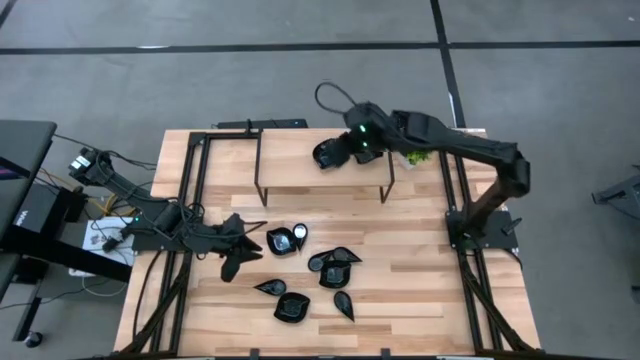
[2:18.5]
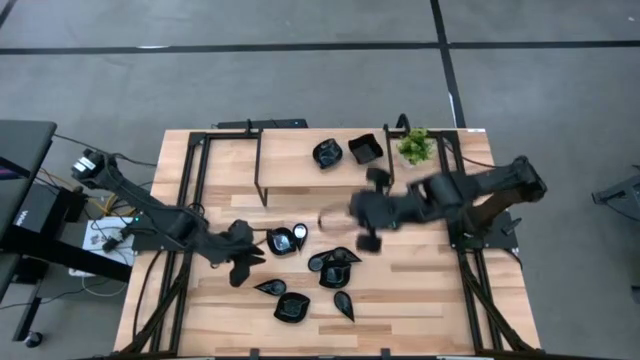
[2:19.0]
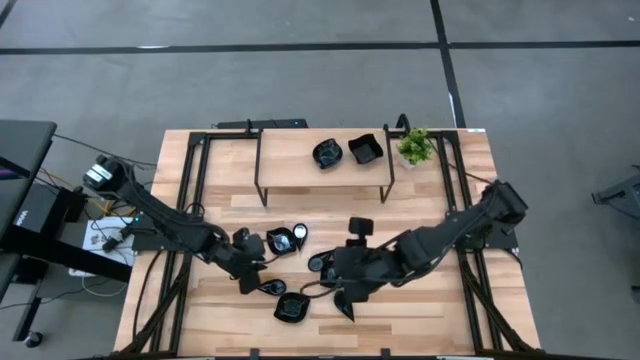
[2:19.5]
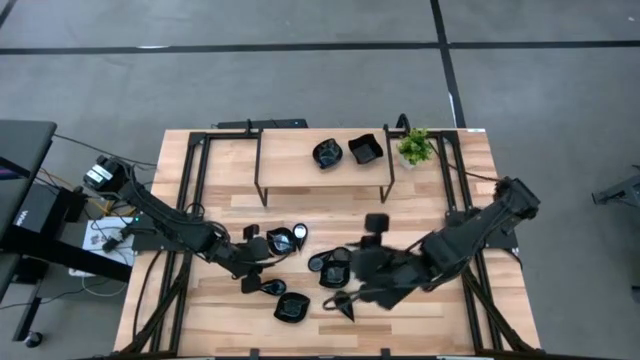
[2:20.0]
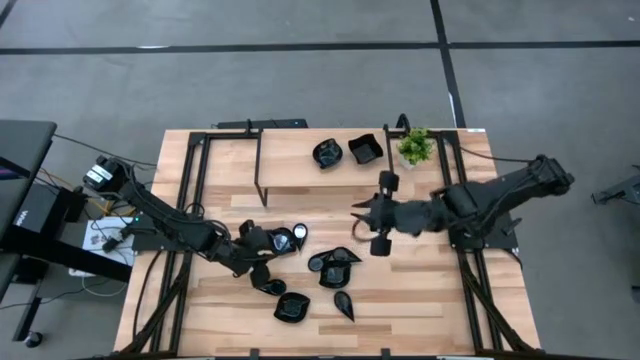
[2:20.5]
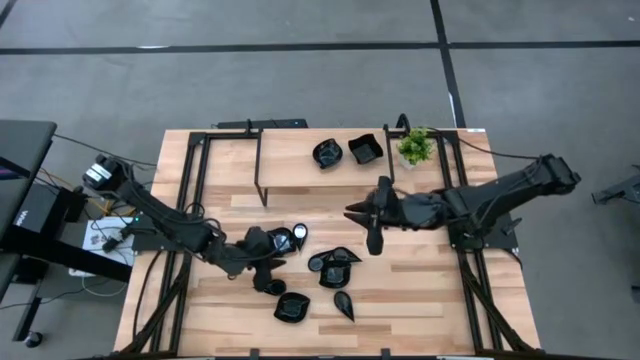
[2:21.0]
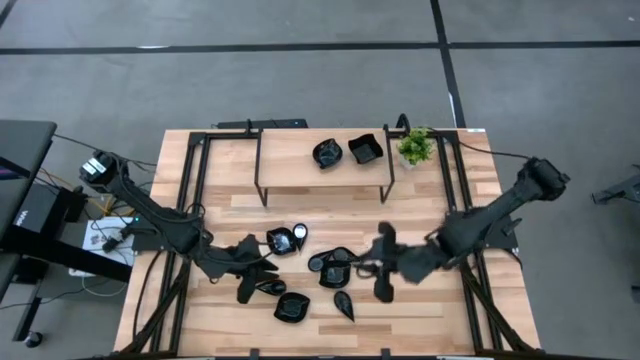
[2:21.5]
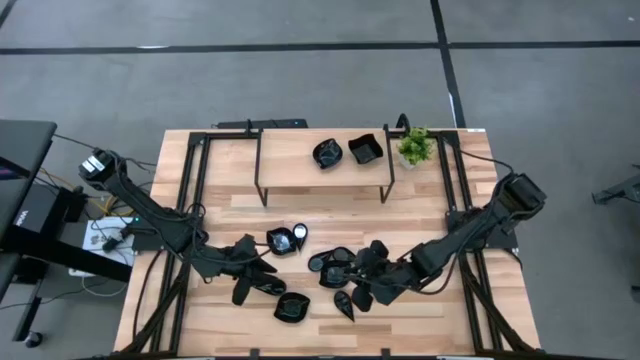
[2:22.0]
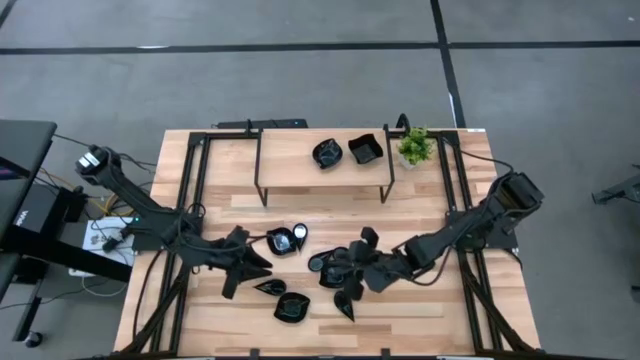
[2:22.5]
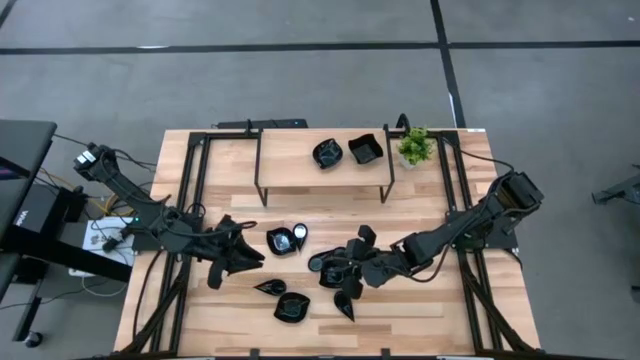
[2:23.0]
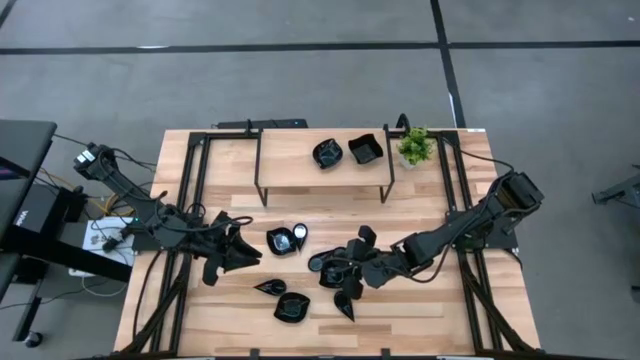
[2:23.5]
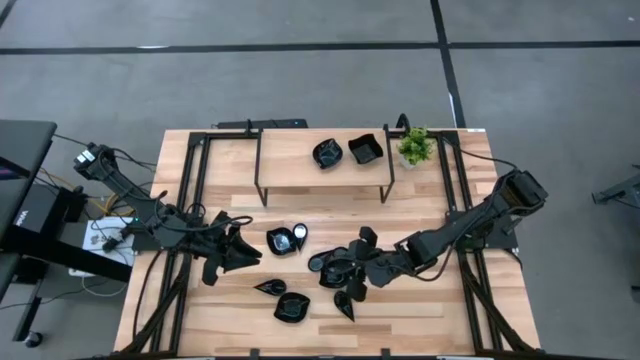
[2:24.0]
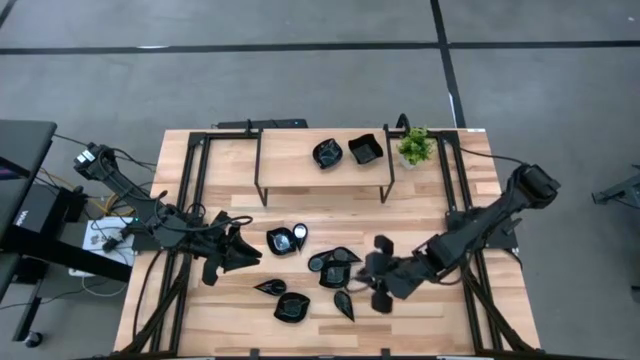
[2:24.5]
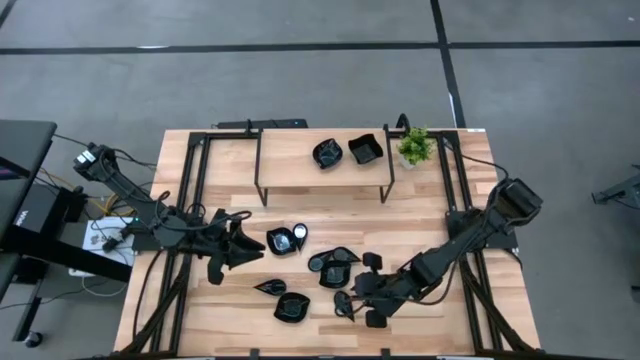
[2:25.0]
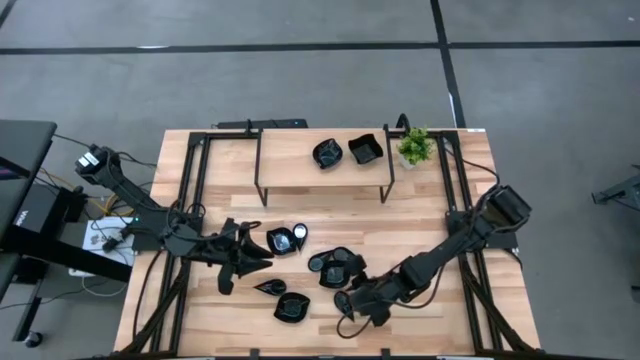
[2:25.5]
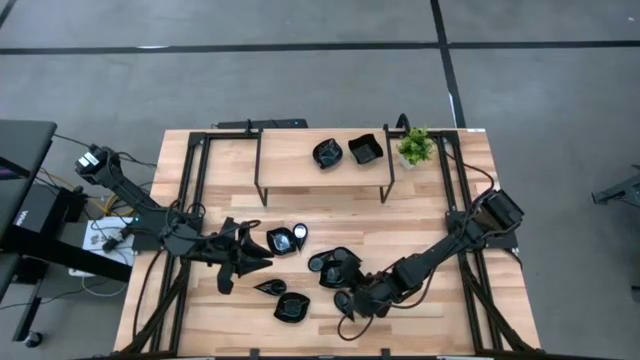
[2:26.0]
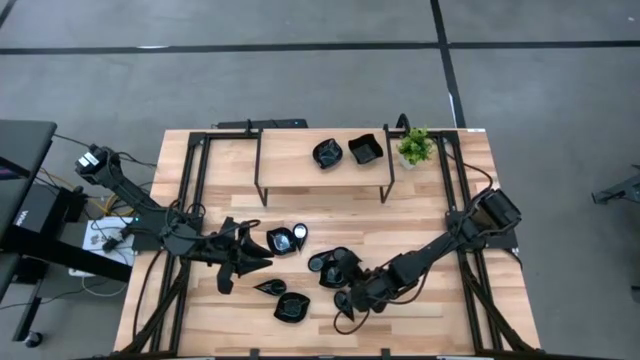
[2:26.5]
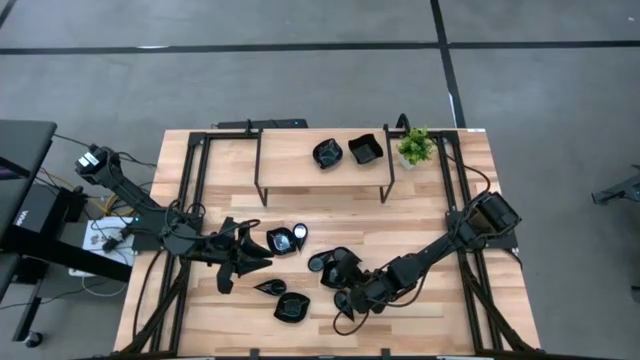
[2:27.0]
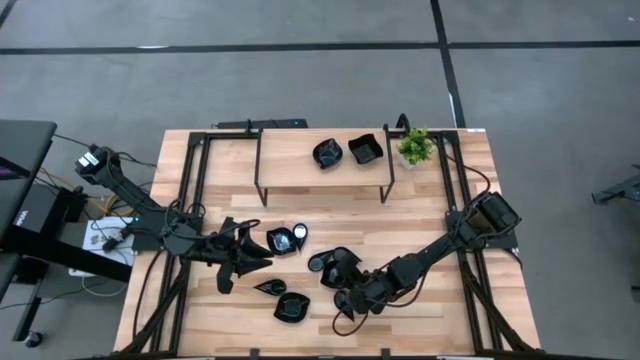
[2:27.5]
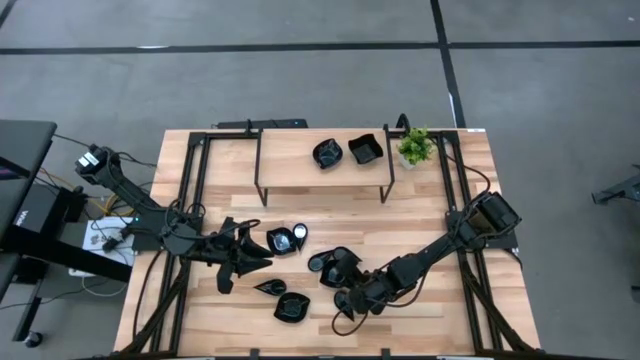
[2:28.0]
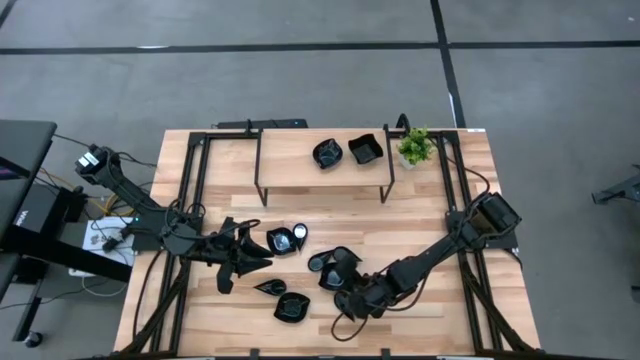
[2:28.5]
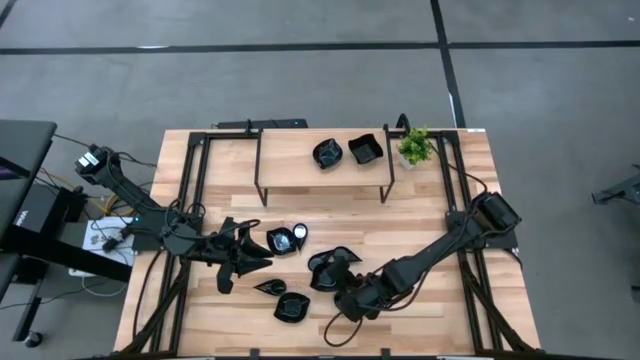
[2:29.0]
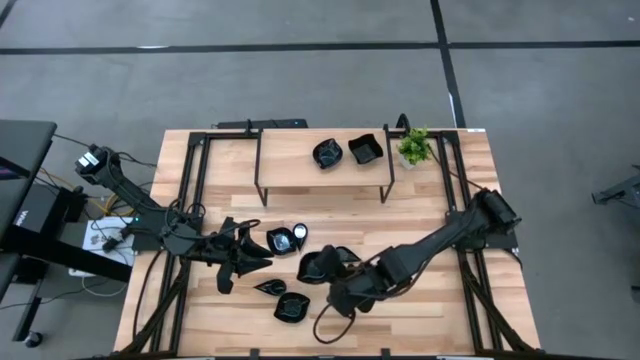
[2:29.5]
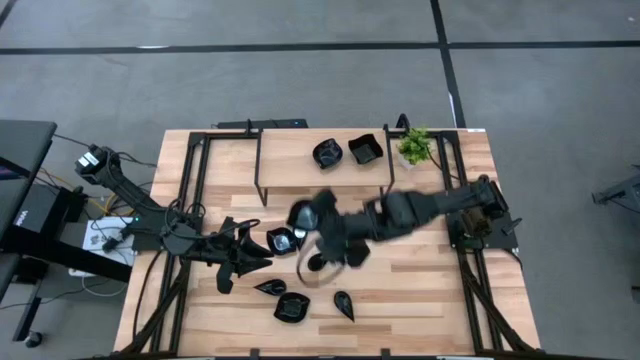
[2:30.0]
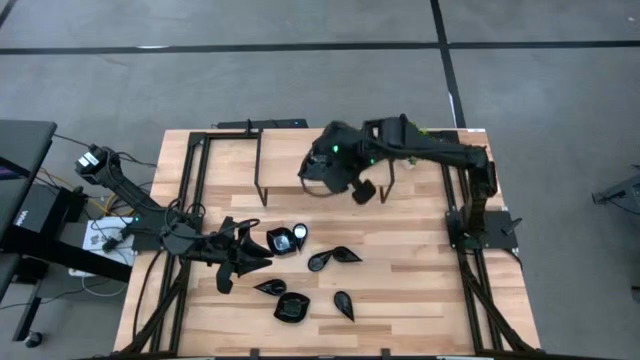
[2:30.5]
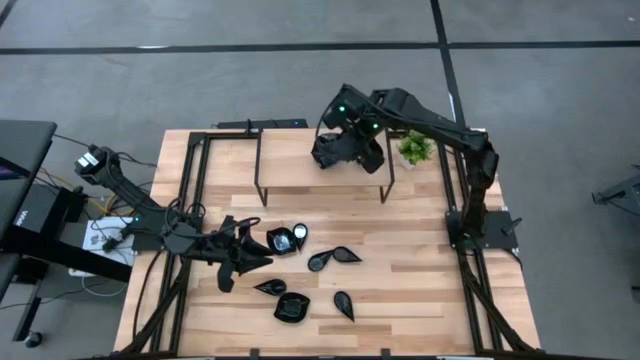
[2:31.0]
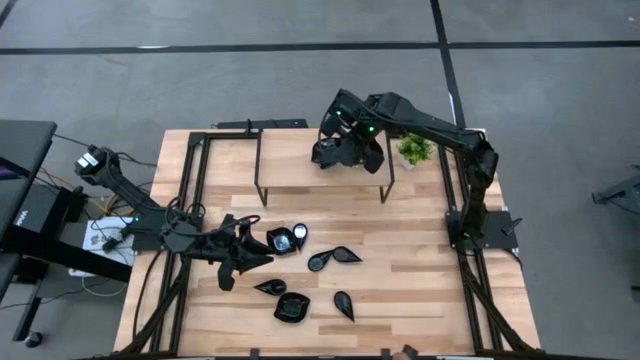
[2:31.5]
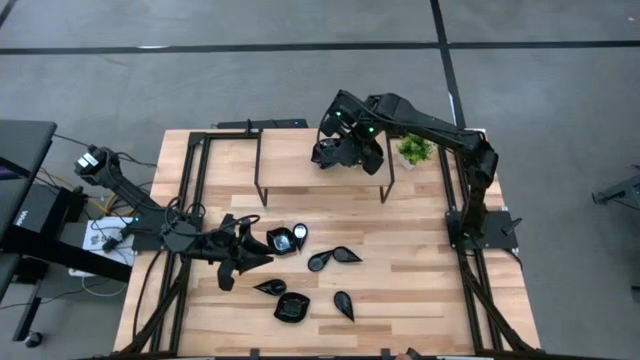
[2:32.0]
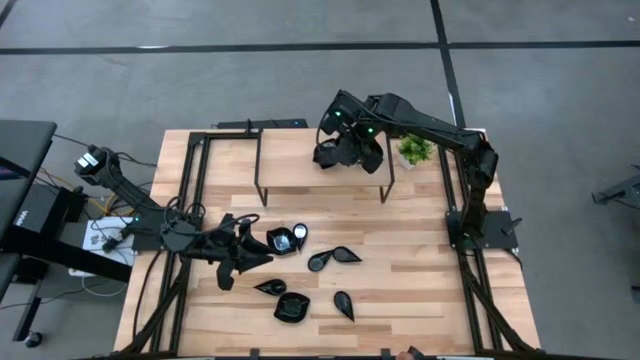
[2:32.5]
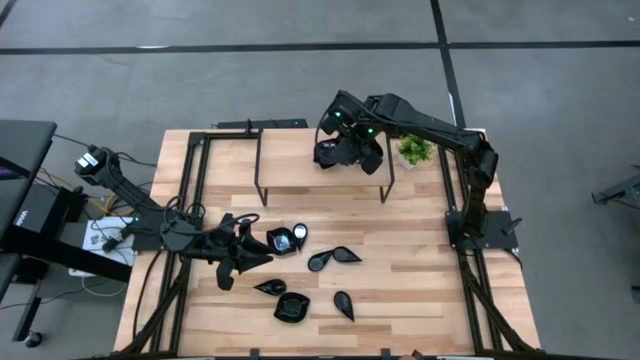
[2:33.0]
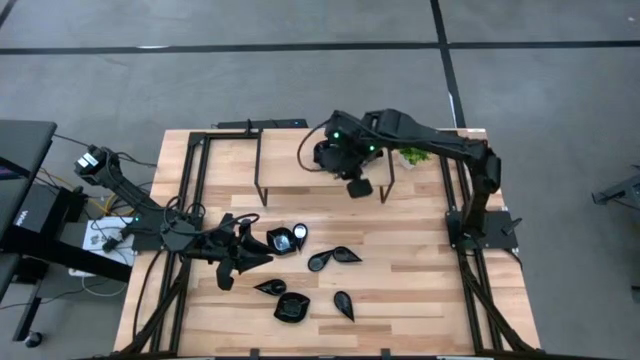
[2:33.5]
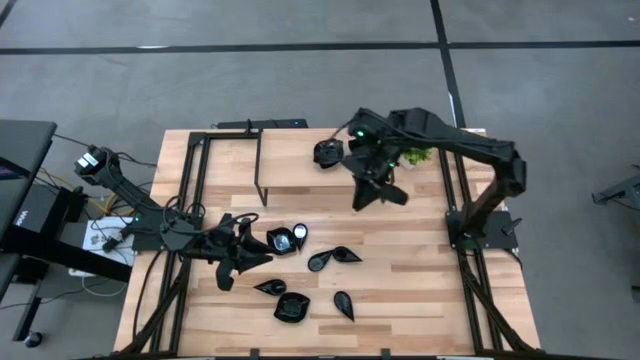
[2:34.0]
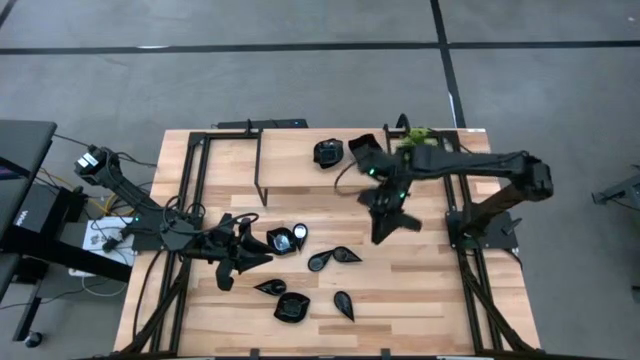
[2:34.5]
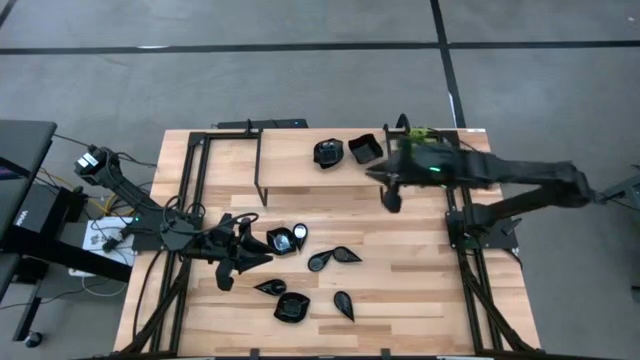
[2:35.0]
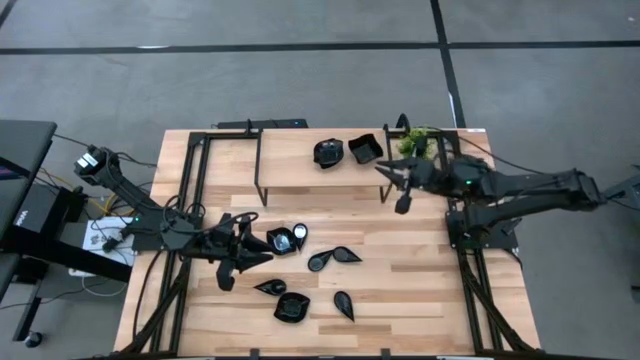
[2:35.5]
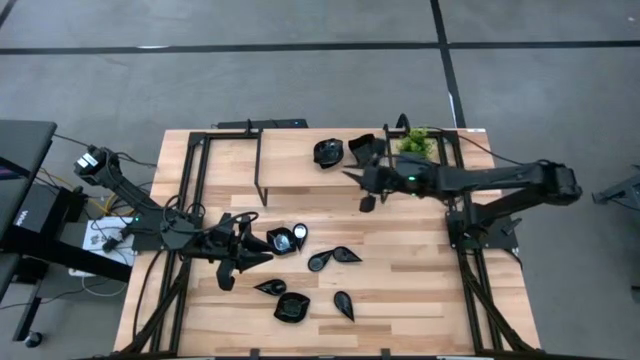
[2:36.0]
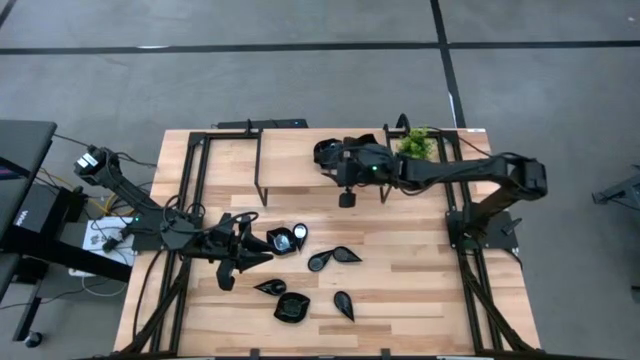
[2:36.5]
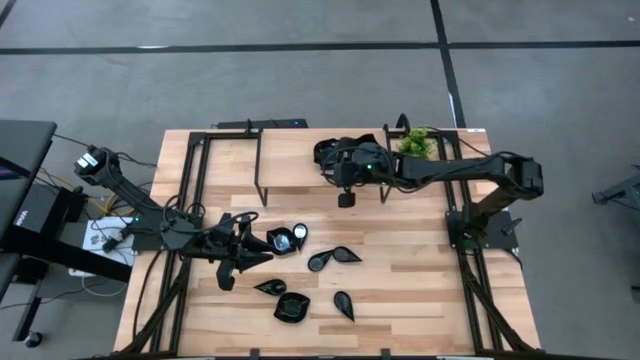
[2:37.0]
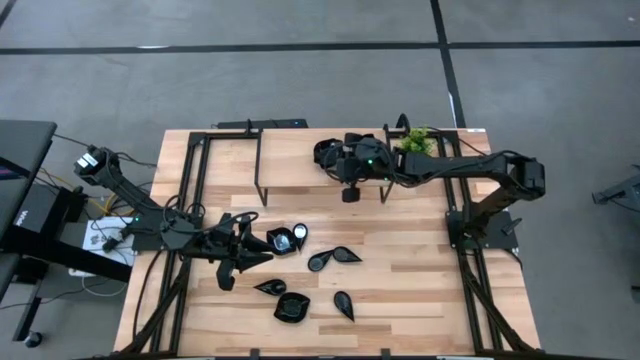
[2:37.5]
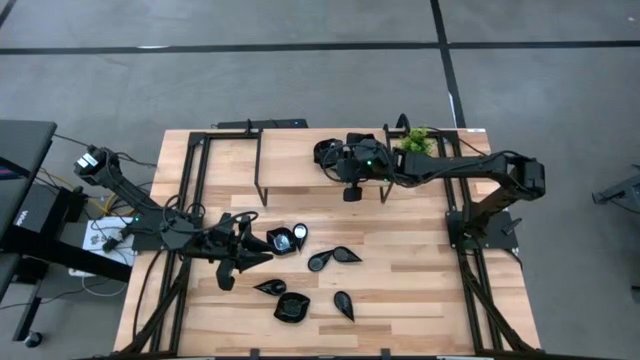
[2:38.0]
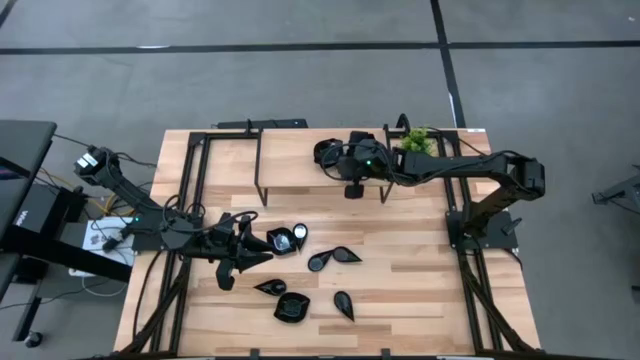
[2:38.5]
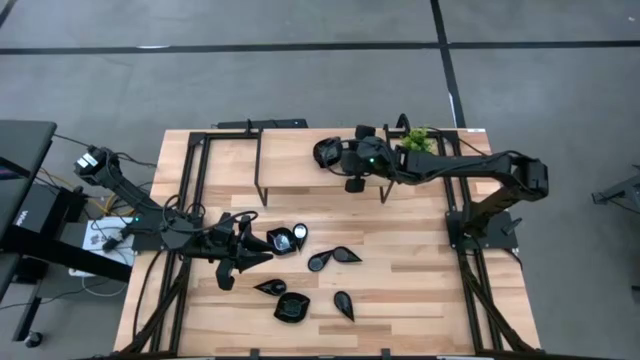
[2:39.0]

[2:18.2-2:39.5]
Task: Pick & Place Mini shaped plates
Stack the black leaf shaped plate on the black leaf shaped plate on the shelf
